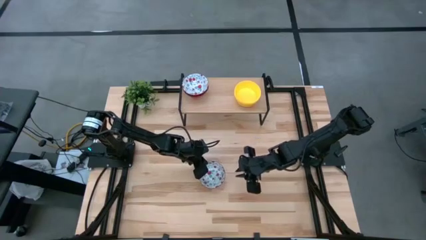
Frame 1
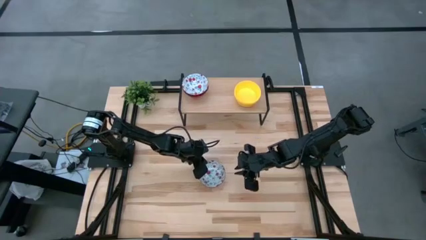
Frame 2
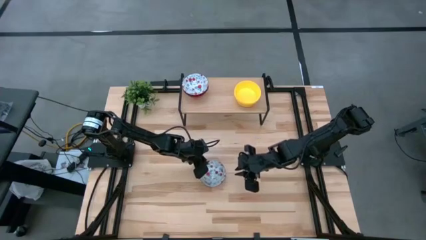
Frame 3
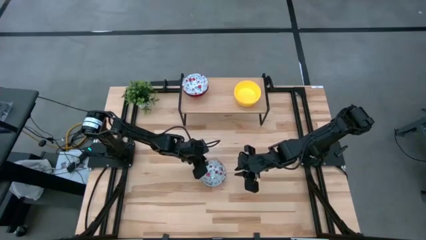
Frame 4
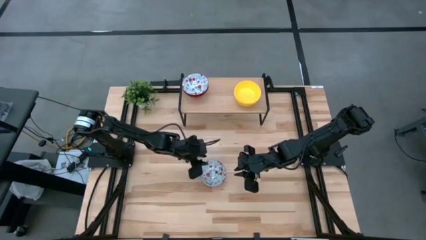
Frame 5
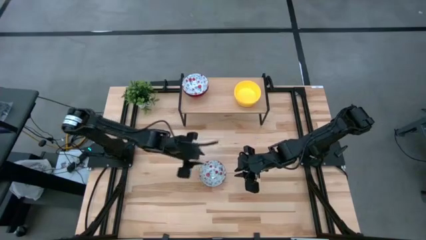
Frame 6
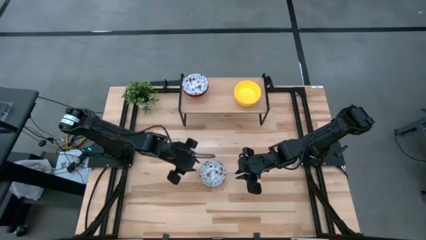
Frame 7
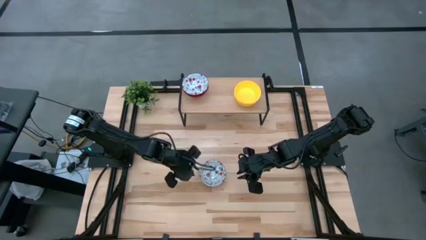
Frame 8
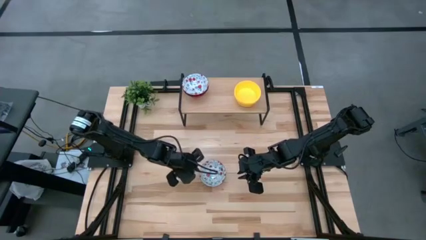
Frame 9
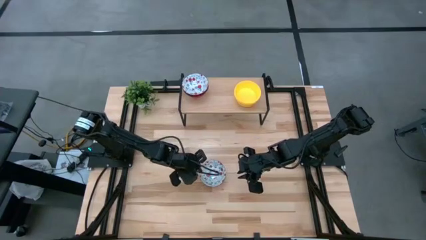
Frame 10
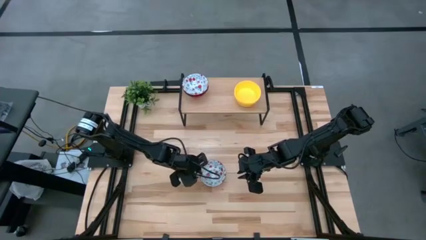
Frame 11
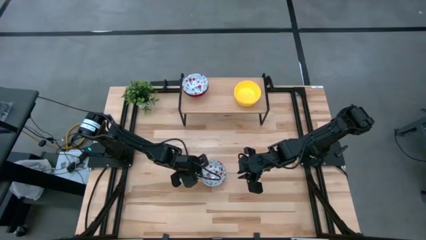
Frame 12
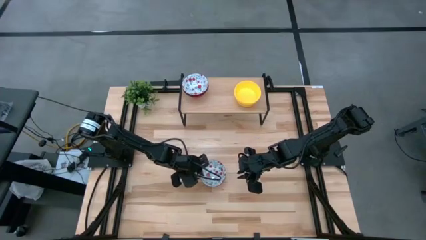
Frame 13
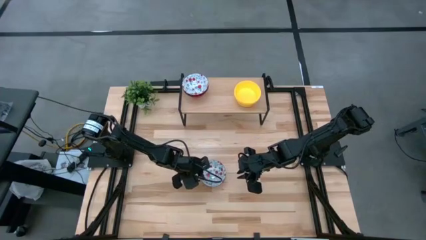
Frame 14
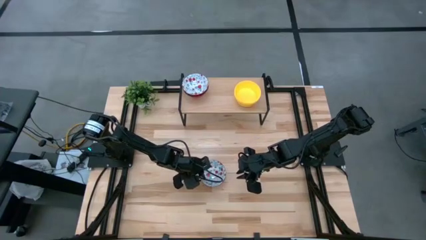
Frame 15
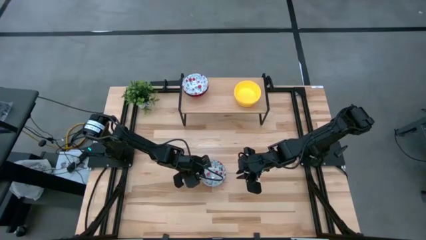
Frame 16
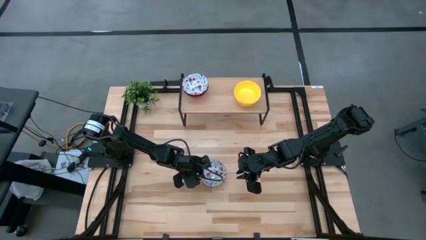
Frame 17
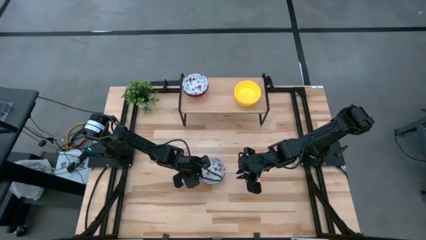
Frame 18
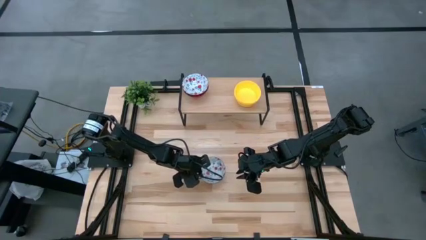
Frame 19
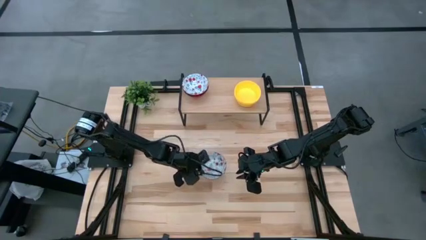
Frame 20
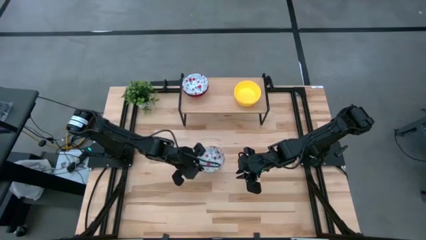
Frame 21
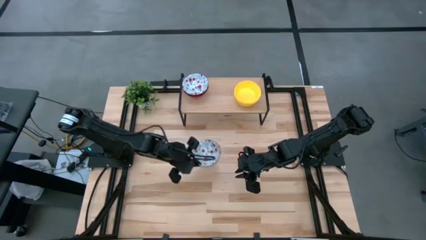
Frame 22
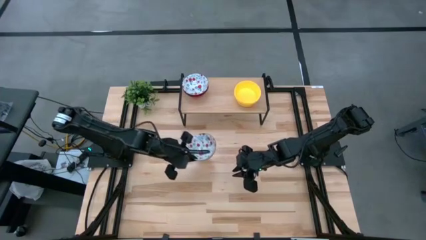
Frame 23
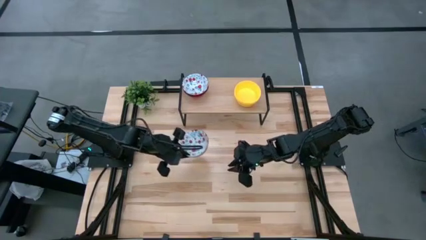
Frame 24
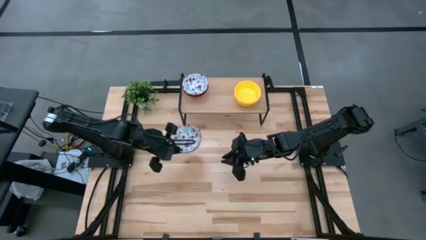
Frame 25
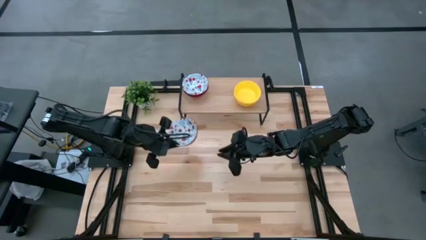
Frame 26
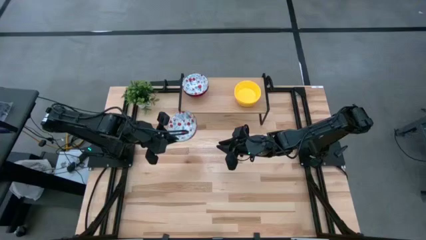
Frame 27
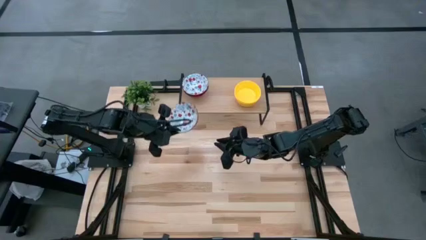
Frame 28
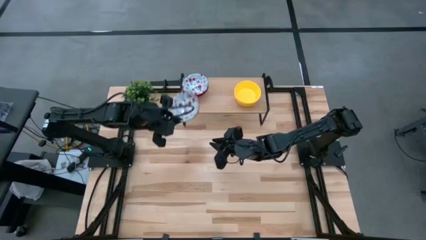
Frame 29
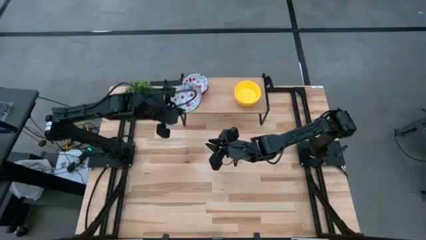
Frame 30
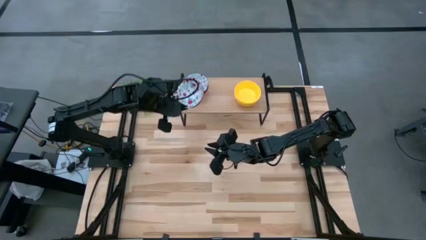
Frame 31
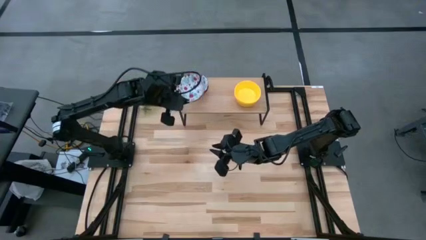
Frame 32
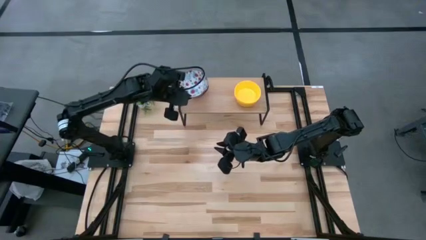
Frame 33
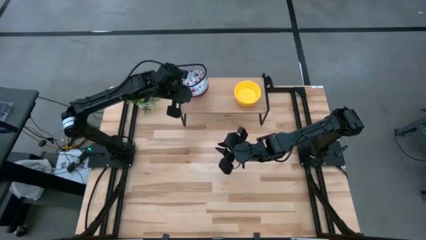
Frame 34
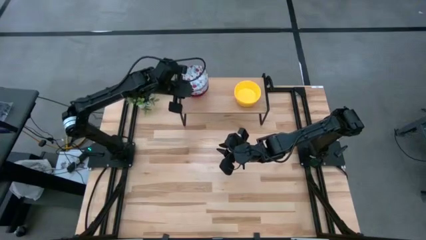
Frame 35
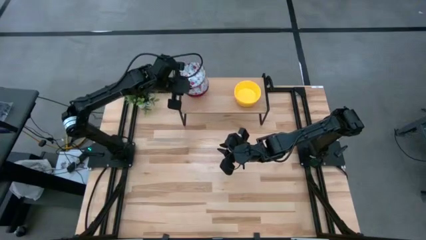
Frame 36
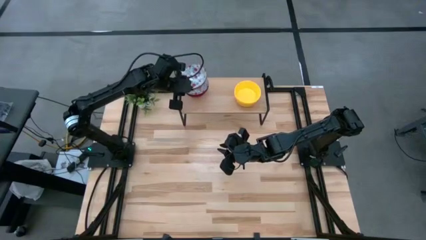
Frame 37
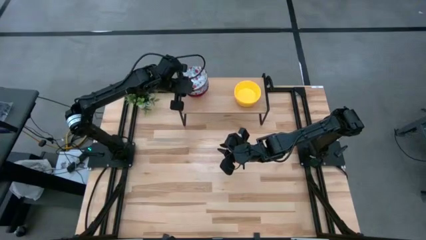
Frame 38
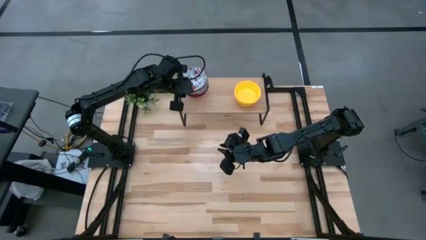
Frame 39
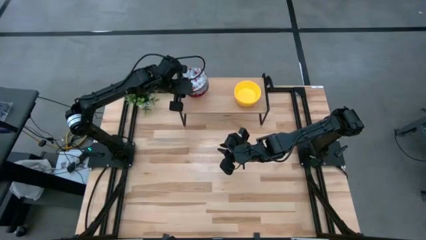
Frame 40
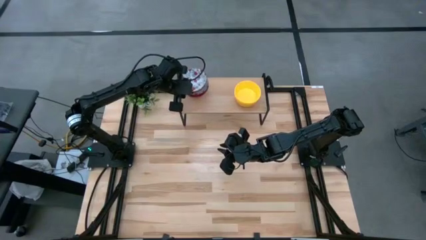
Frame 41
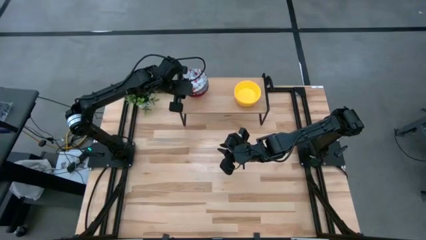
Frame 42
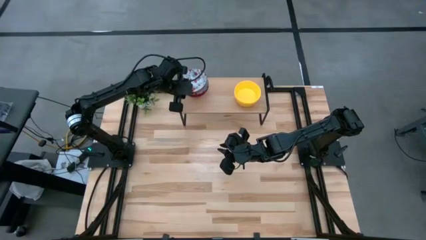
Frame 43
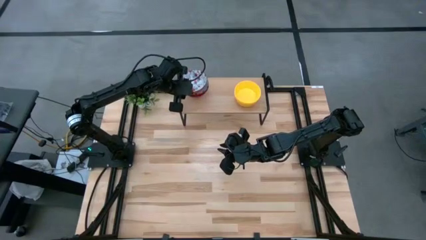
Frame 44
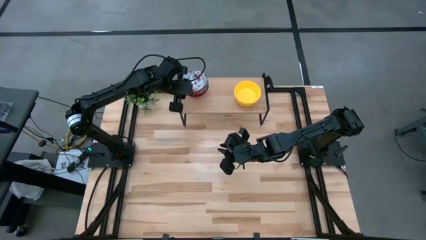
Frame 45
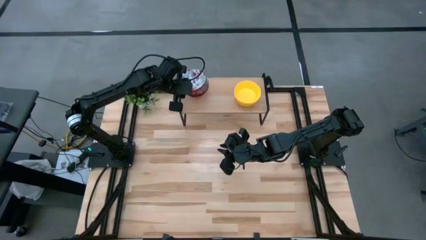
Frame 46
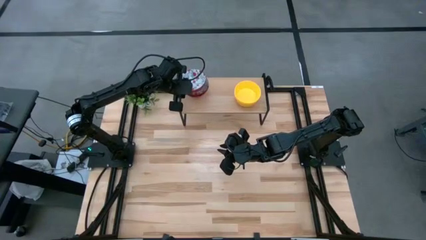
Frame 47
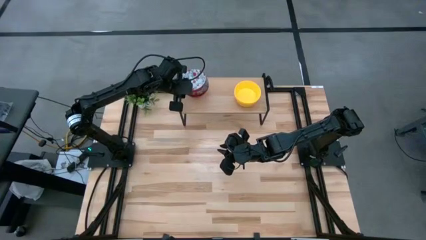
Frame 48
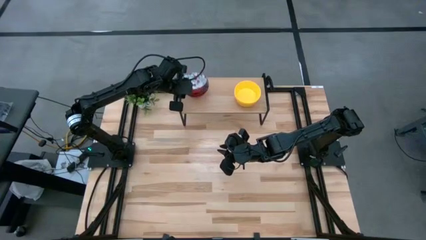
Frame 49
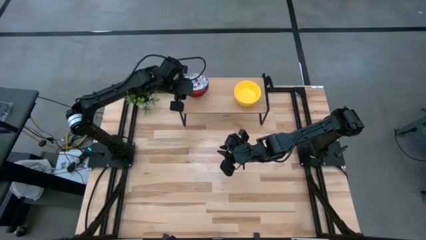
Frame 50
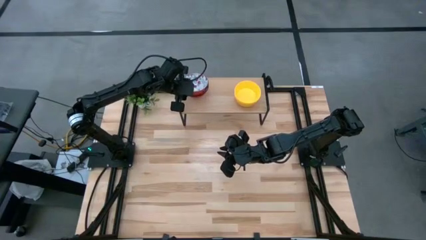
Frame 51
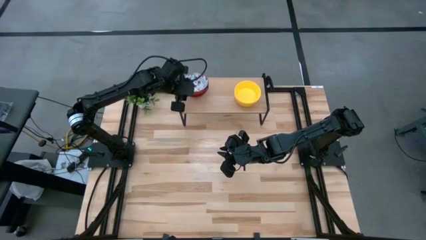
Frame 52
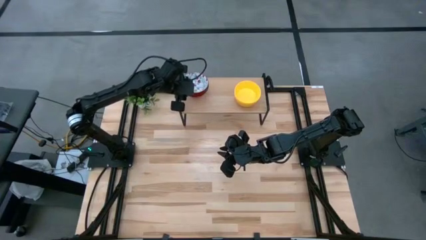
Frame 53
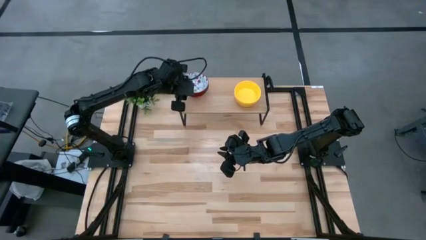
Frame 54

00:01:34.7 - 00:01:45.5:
Task: Pick & Place Mini bowls
Stack the red and blue bowl on top of the other red and blue bowls on the shelf

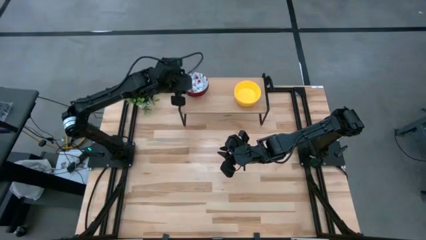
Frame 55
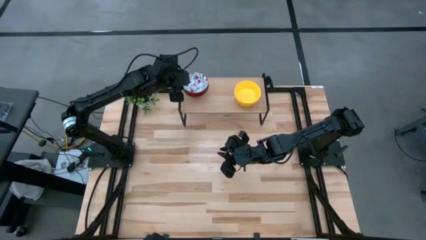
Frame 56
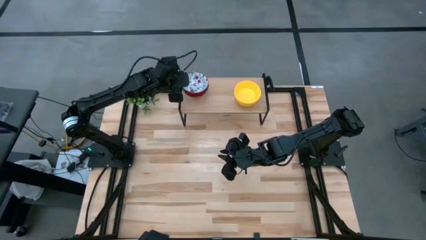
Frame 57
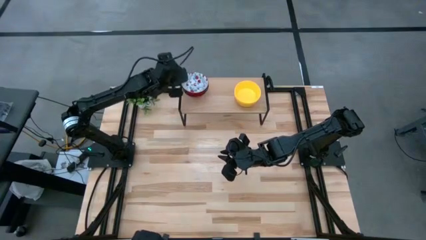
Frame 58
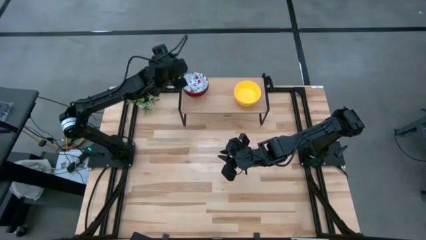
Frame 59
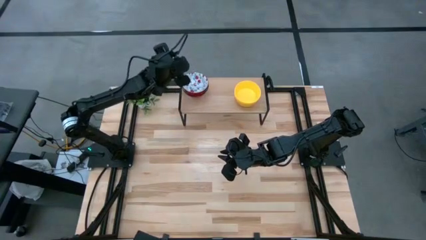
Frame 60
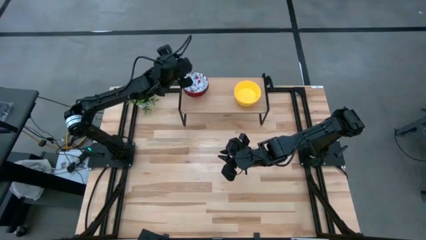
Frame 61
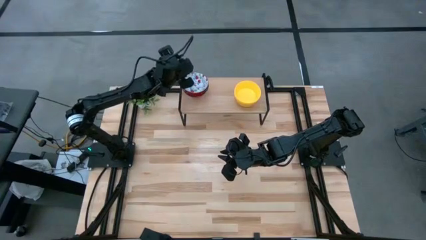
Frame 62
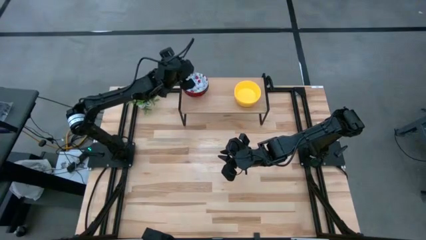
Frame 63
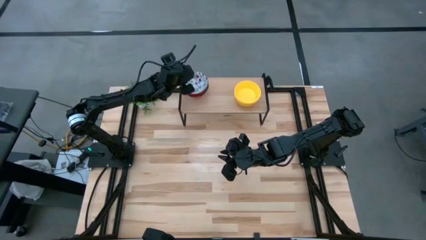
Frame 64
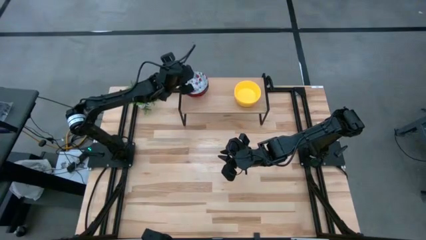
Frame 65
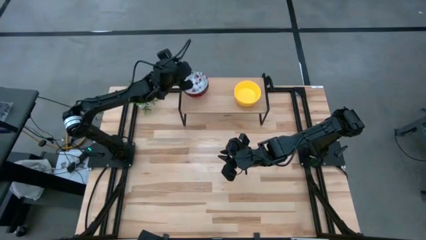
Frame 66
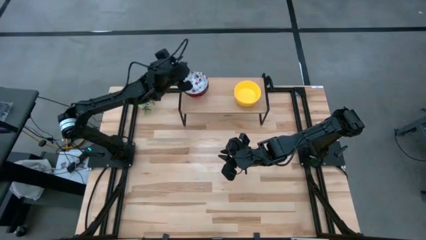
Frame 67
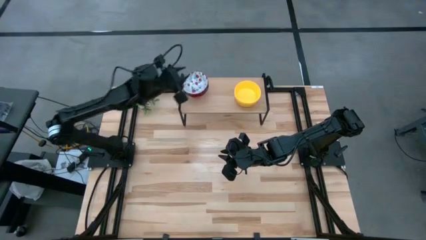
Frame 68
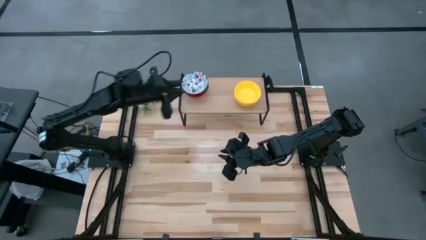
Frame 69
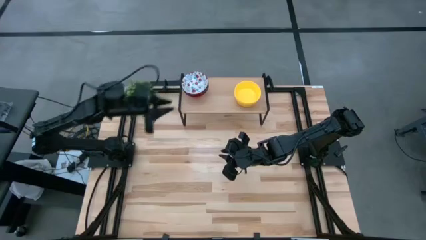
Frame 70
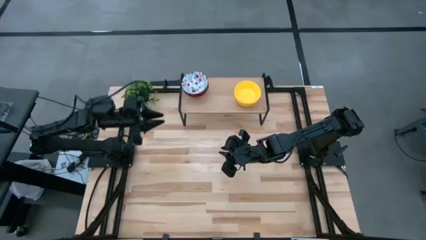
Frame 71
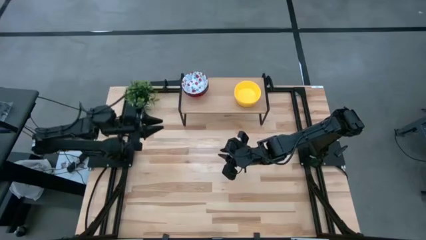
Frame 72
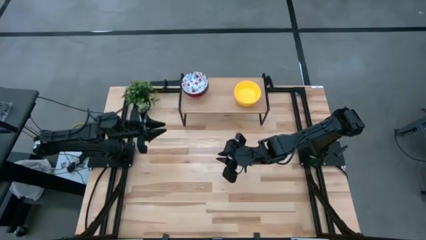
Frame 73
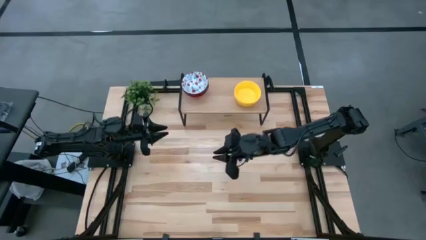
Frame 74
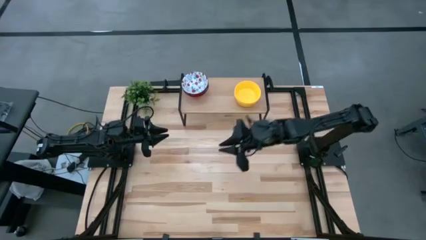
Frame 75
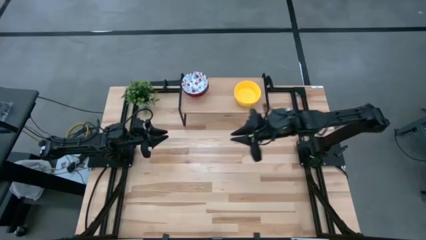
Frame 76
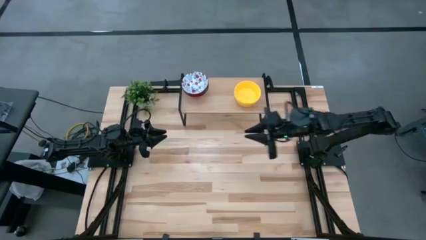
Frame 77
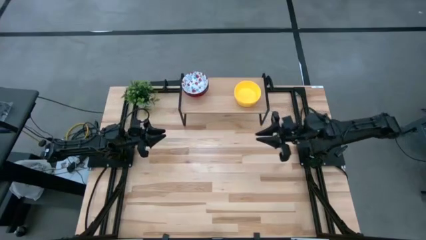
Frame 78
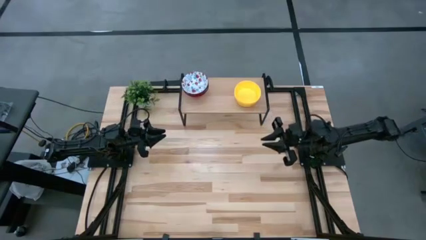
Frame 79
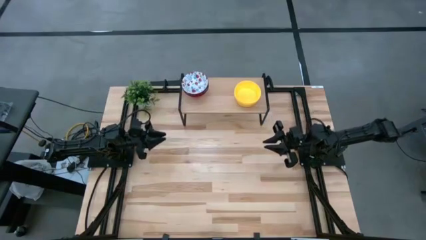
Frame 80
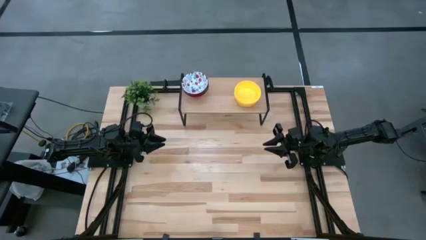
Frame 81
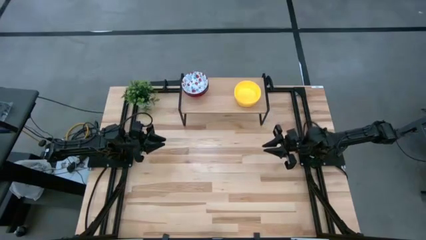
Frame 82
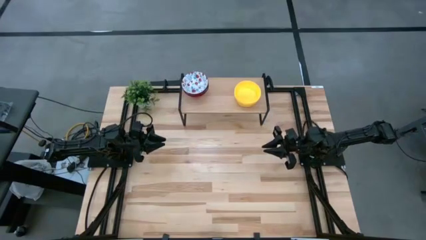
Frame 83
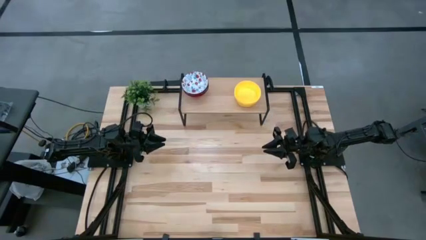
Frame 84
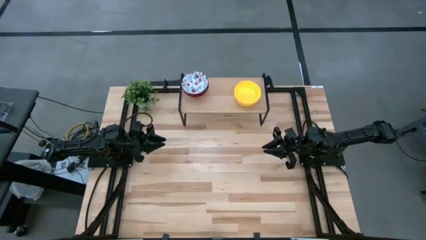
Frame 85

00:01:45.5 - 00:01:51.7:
Return to Home Position
